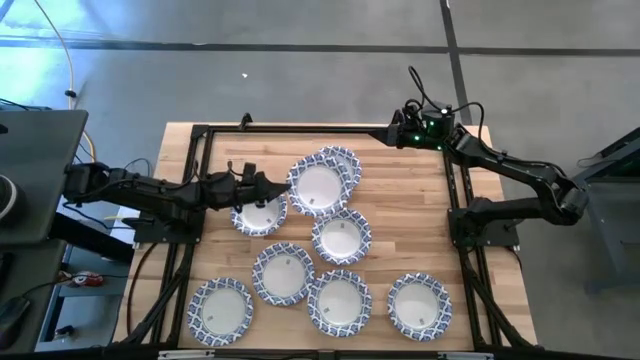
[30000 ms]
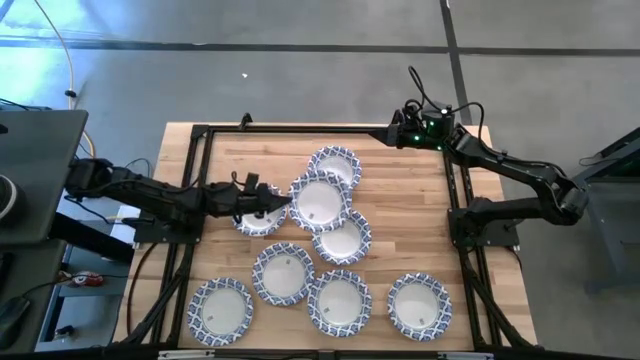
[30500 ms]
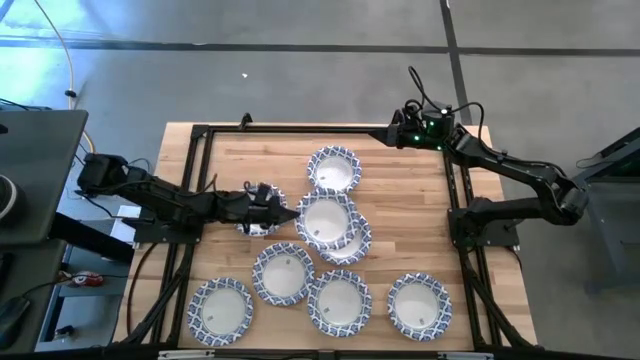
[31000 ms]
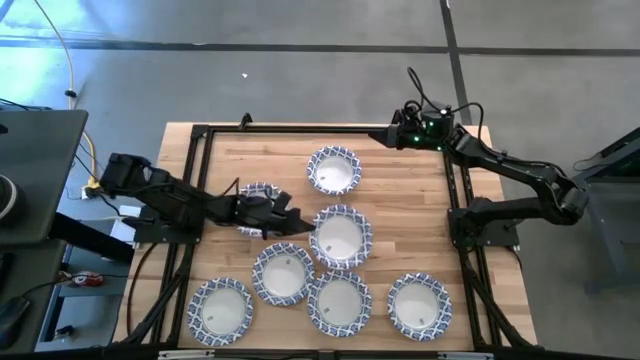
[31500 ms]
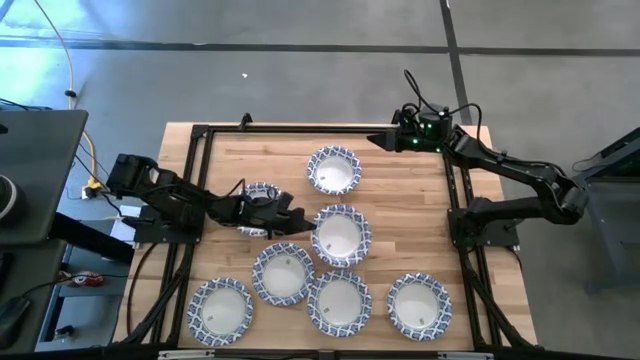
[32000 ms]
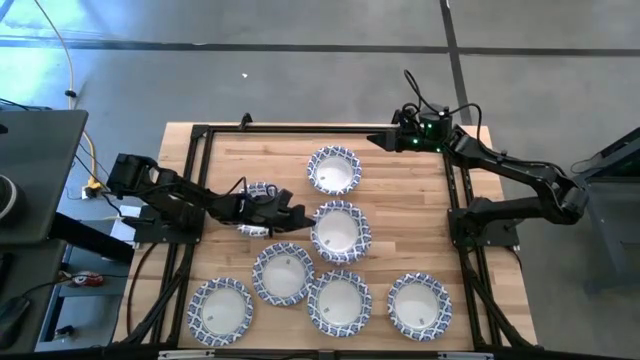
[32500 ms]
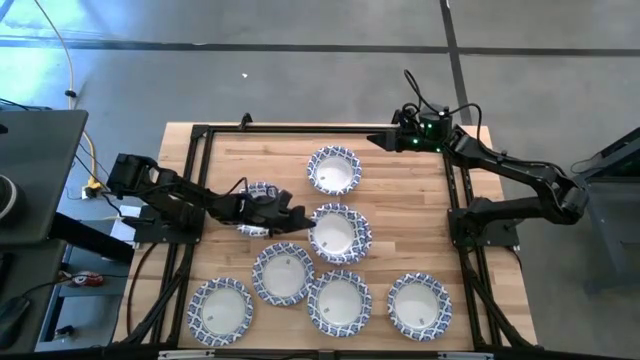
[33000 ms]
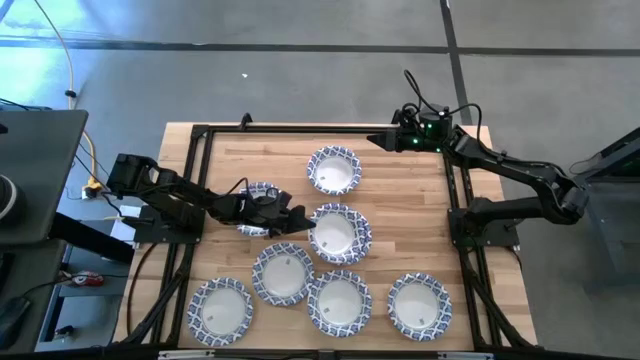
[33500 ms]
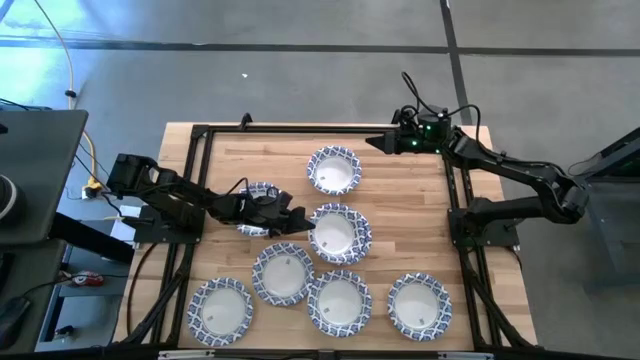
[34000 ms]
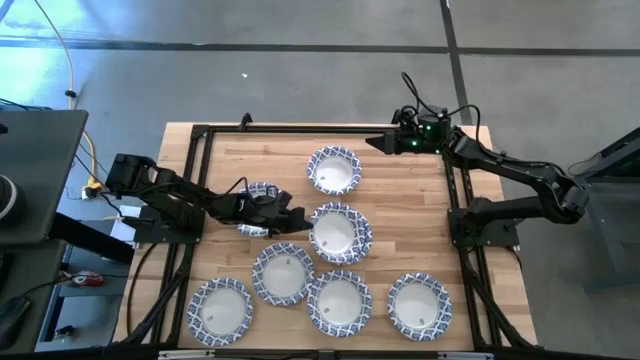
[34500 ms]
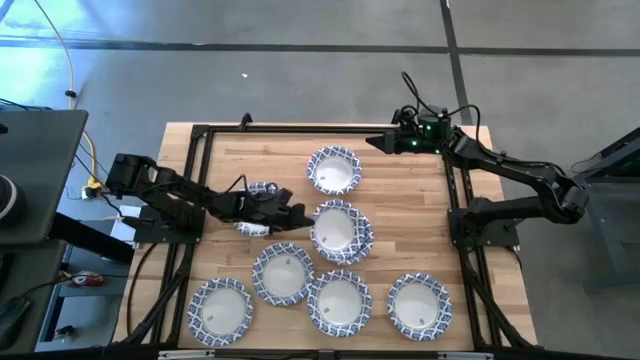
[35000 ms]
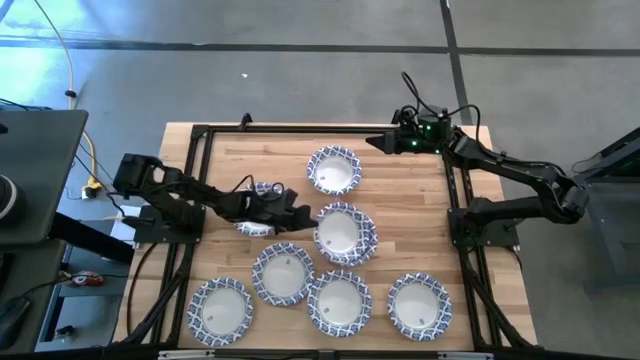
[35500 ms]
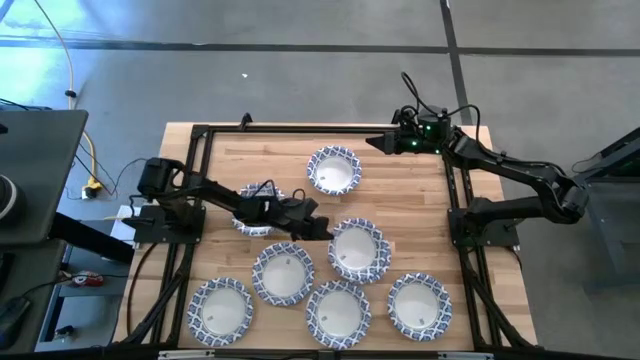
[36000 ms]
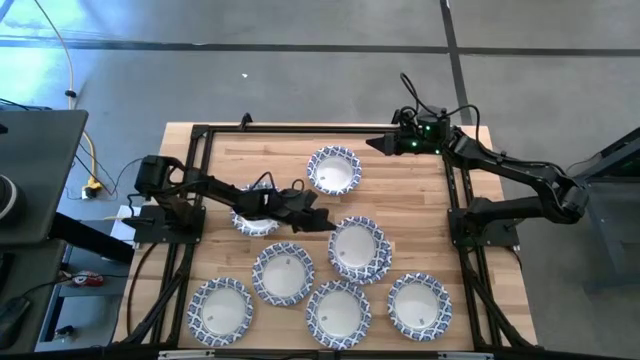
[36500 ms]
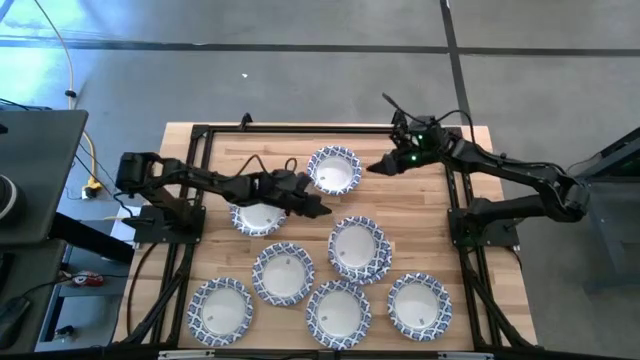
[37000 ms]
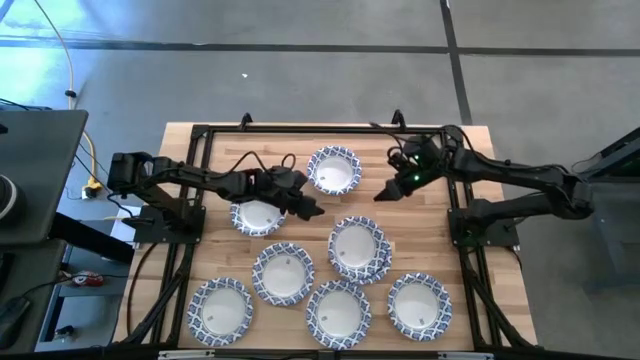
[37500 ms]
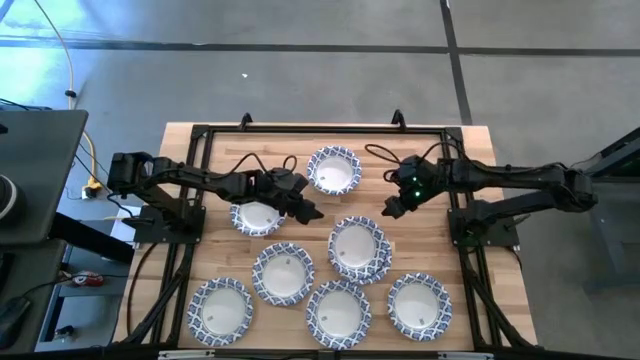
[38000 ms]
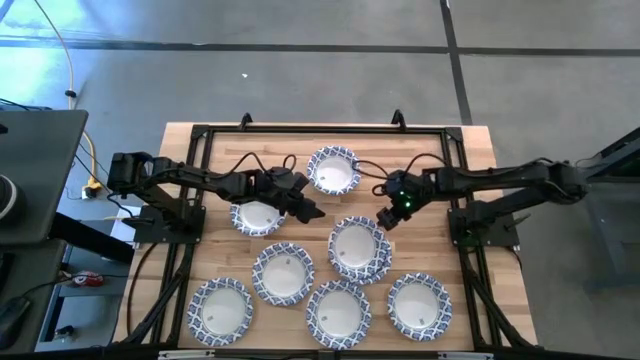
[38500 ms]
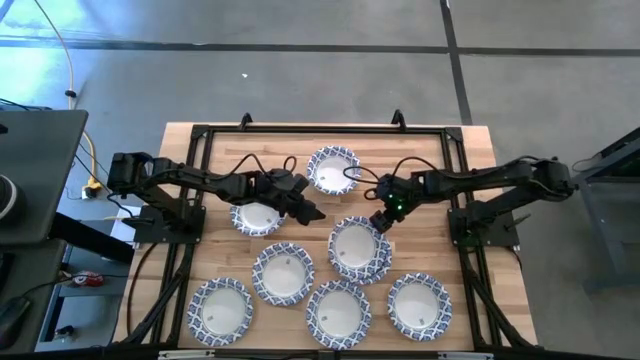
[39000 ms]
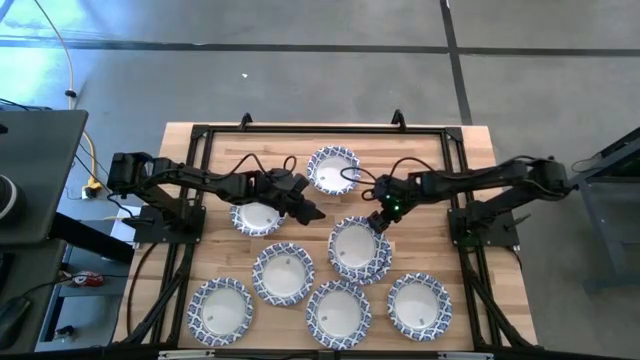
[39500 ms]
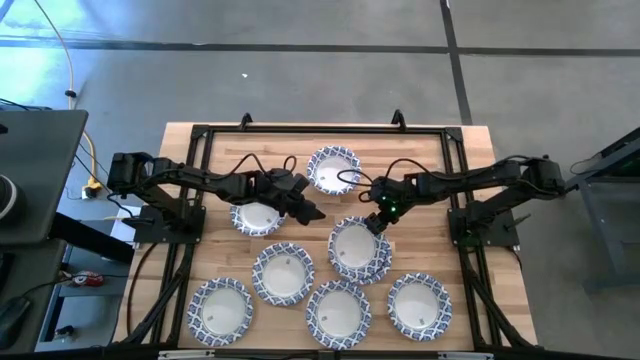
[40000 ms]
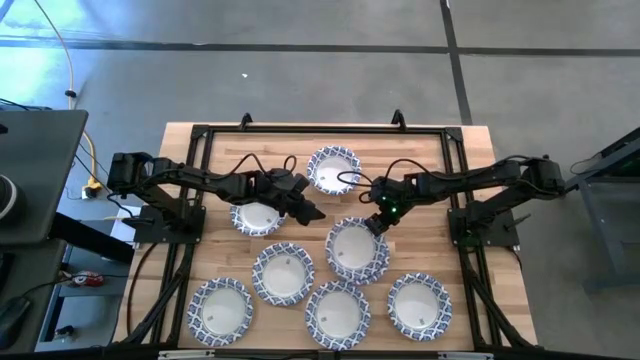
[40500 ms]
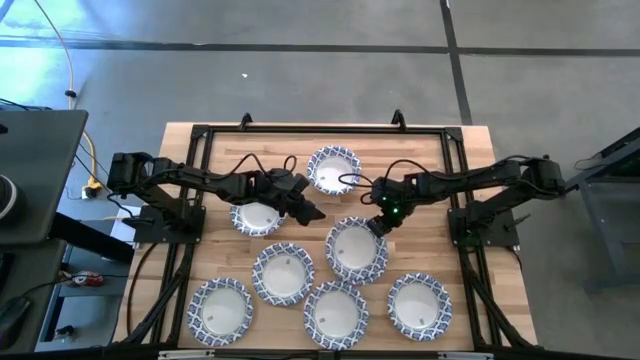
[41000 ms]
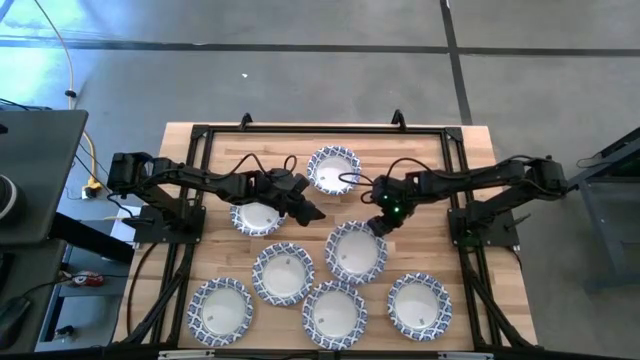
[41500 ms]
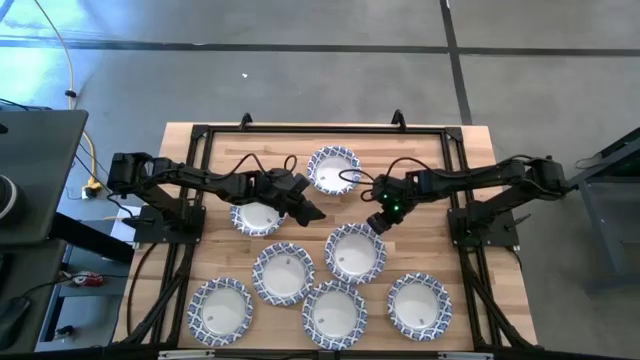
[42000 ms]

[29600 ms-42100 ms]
Task: Nest bowls inside each other
Stack the white patterned bowl on top of the other white patterned bowls

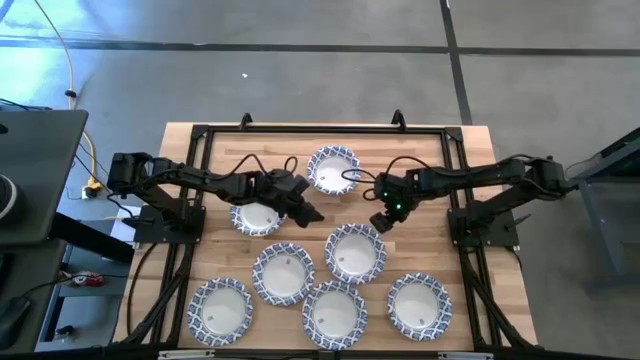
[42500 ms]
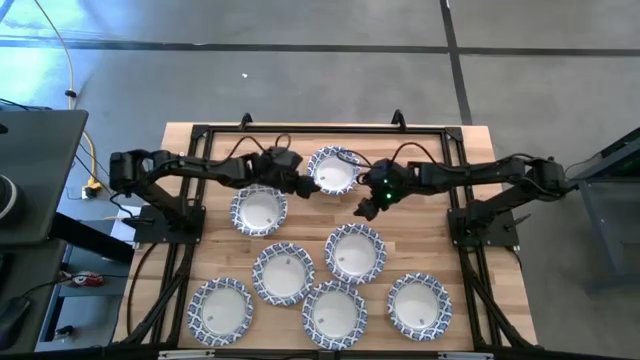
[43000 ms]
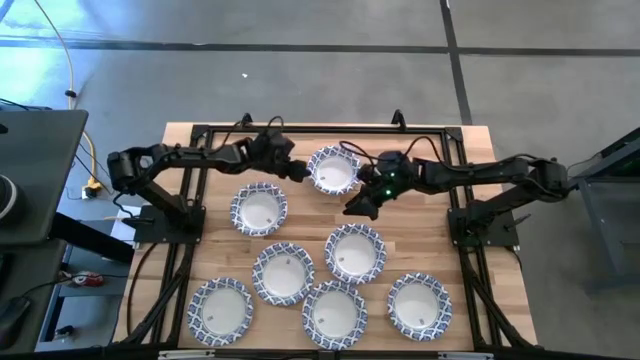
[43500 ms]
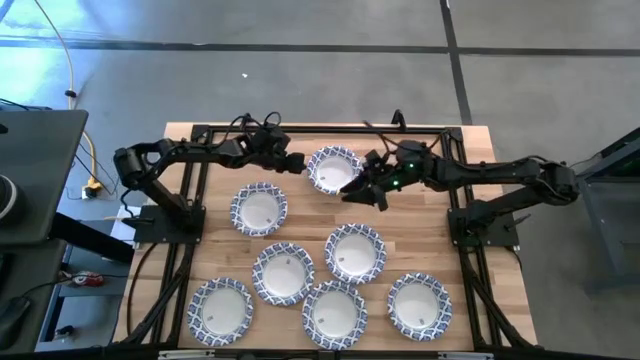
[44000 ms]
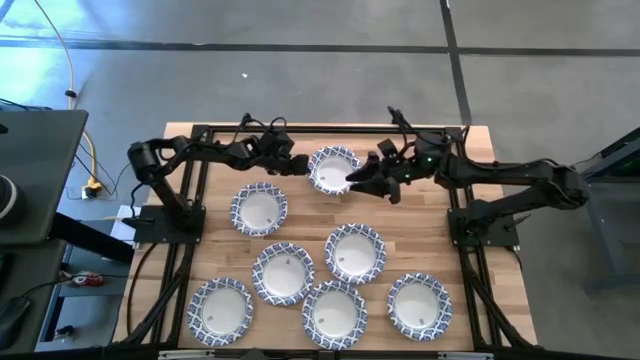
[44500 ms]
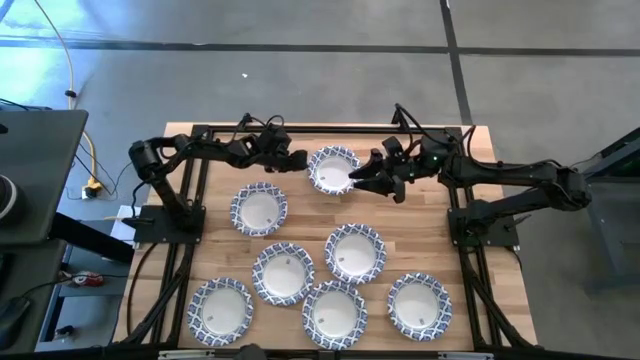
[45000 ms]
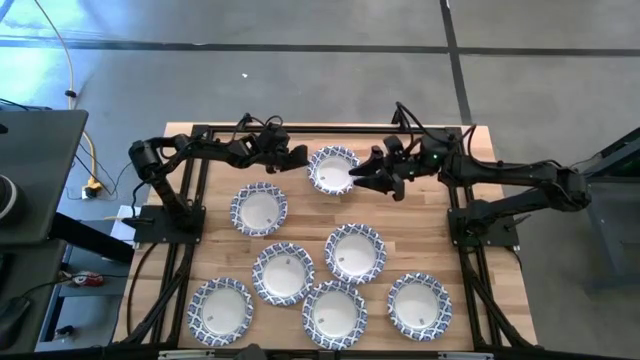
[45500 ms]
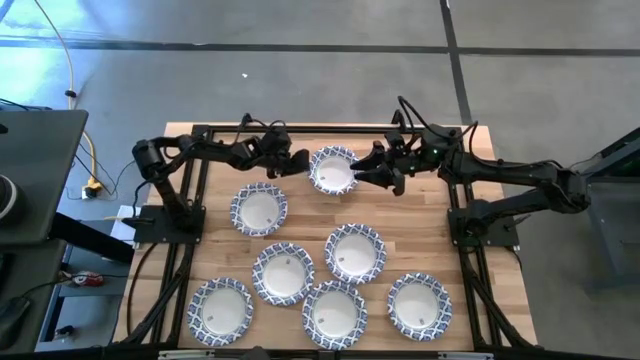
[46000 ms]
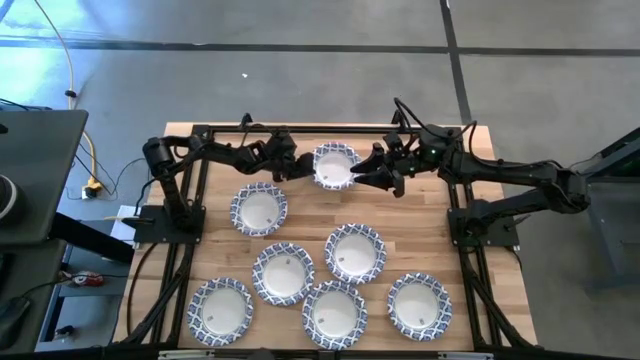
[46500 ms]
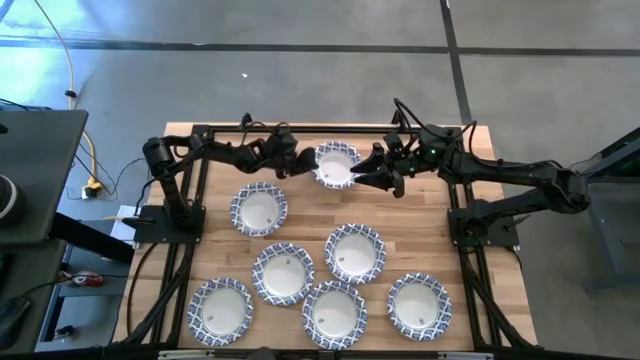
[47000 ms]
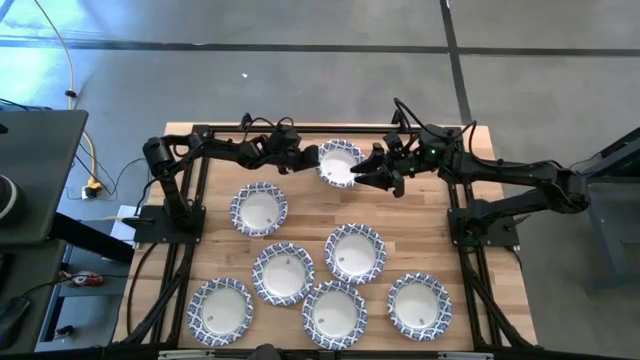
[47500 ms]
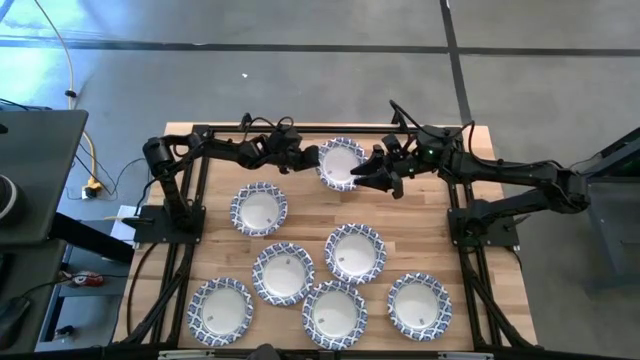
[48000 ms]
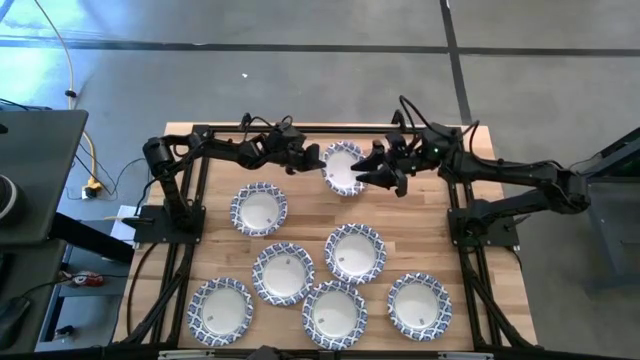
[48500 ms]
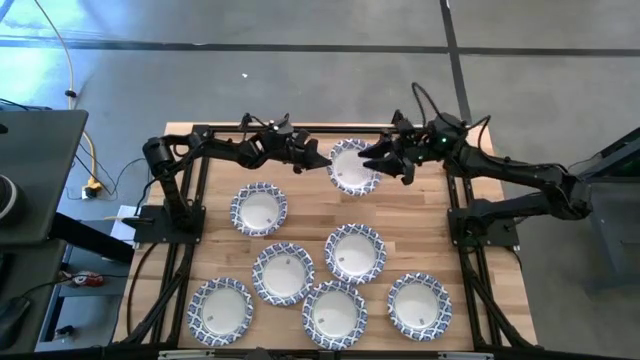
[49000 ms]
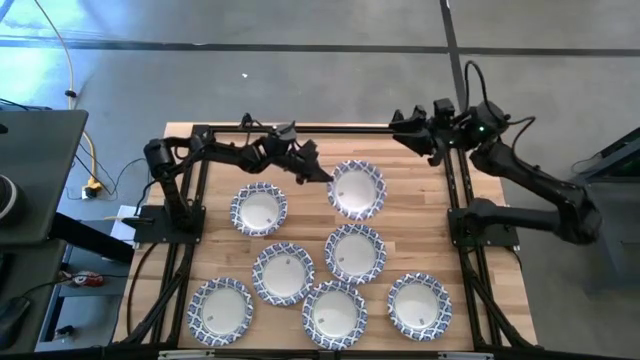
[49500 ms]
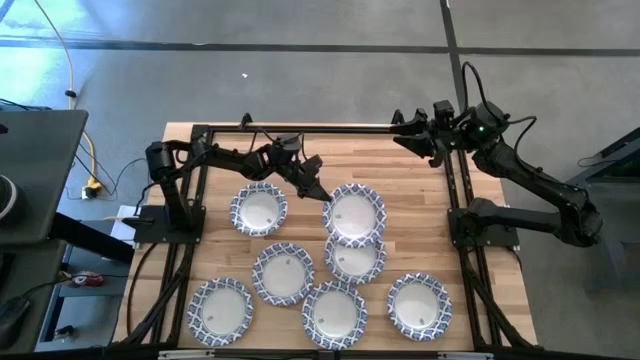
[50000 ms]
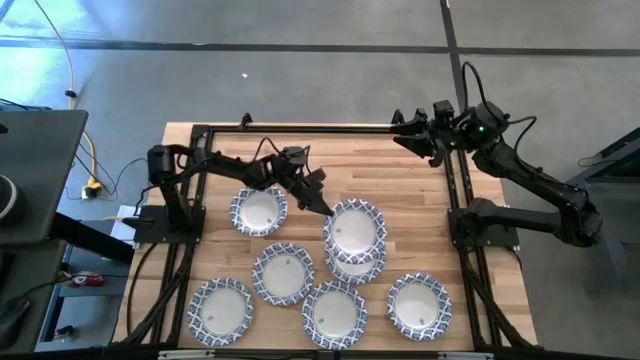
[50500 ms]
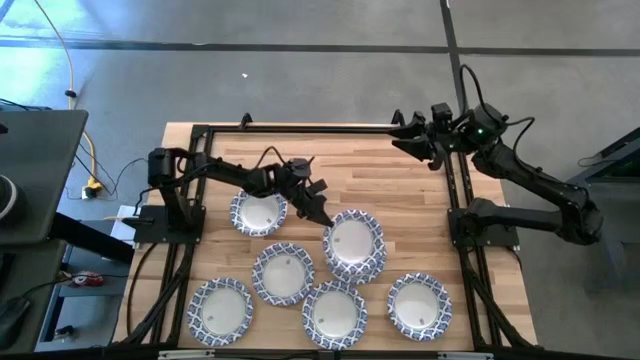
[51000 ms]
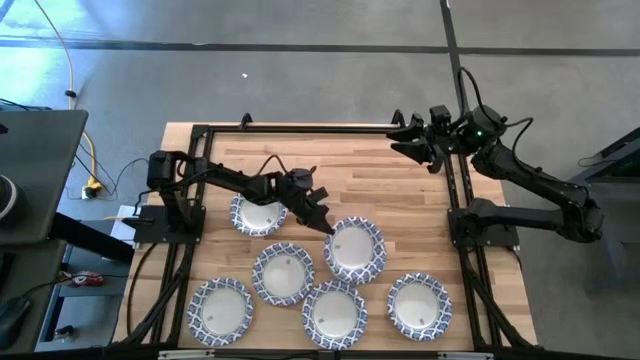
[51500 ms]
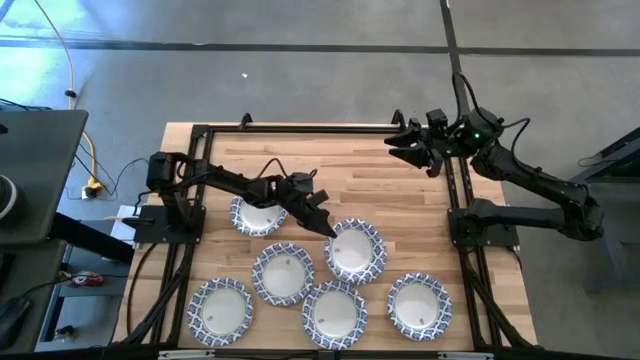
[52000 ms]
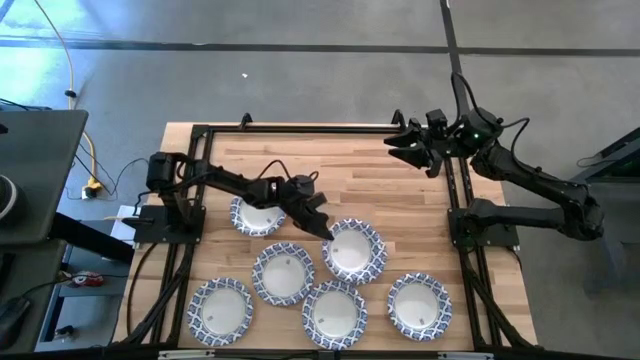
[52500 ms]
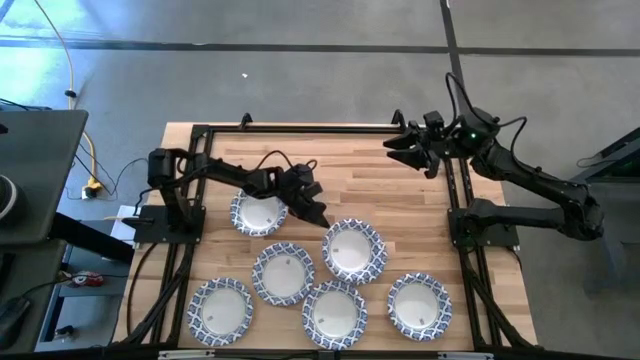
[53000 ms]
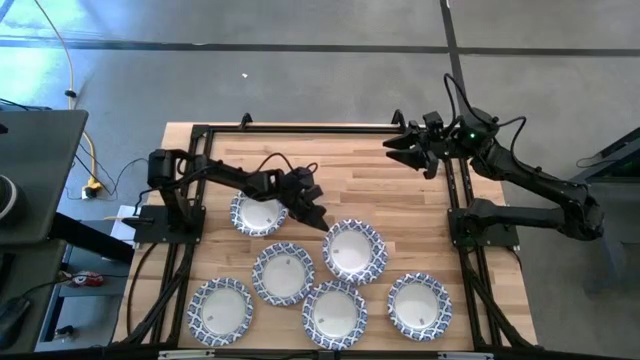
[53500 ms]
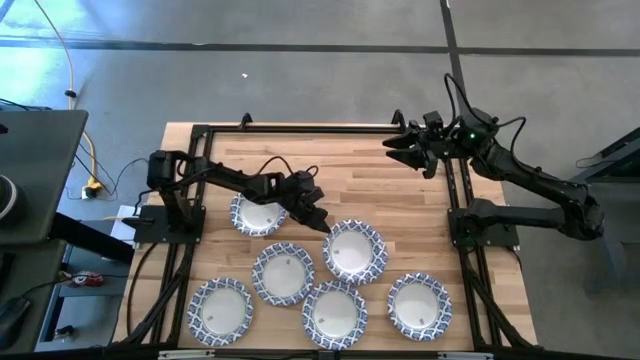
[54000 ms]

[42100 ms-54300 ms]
Stack the white patterned bowl on top of the other white patterned bowls
